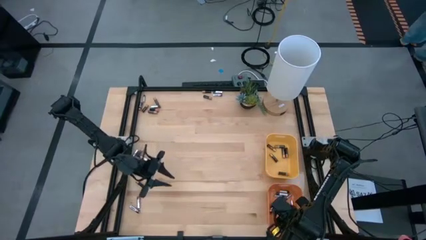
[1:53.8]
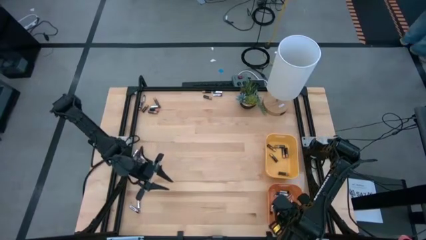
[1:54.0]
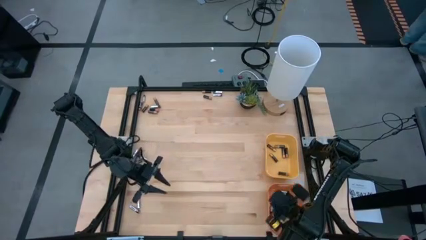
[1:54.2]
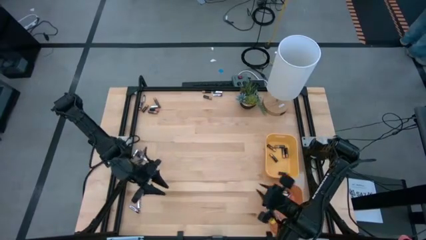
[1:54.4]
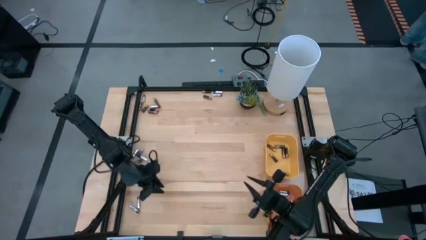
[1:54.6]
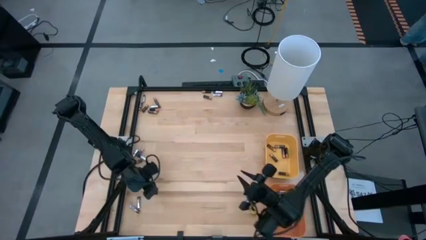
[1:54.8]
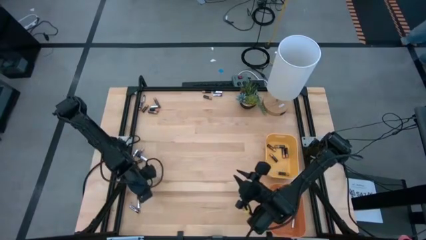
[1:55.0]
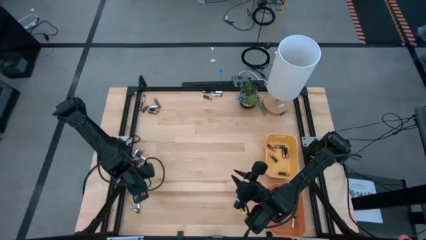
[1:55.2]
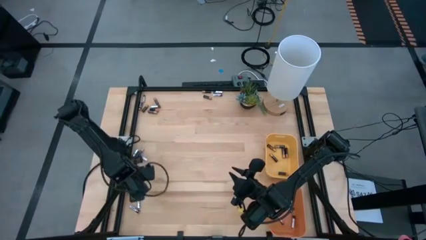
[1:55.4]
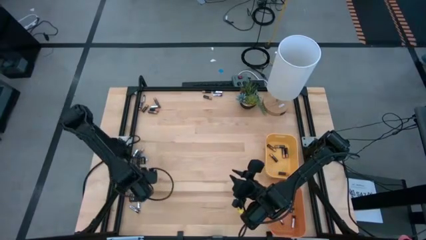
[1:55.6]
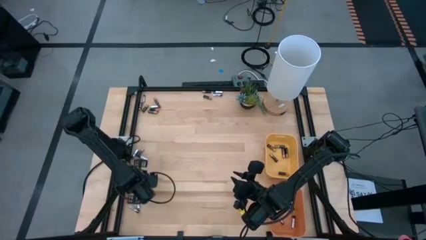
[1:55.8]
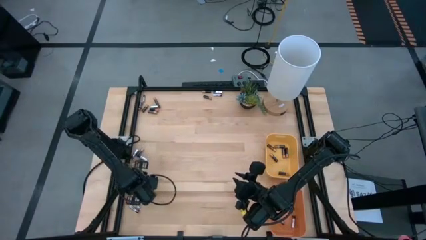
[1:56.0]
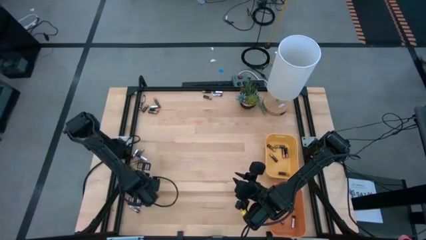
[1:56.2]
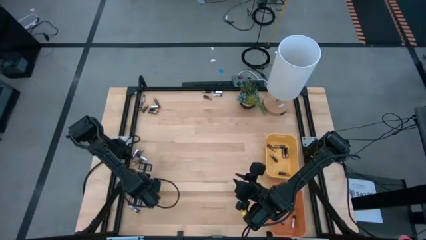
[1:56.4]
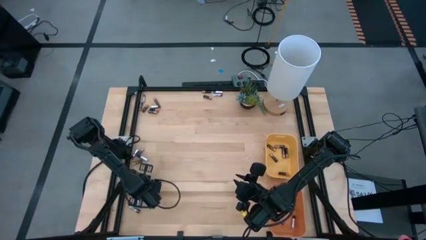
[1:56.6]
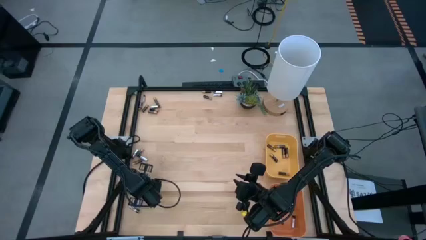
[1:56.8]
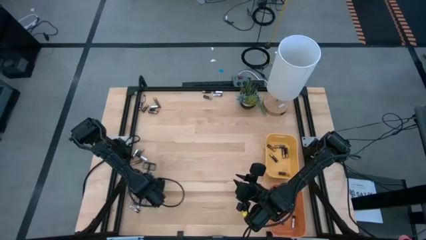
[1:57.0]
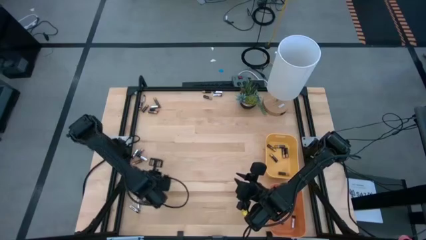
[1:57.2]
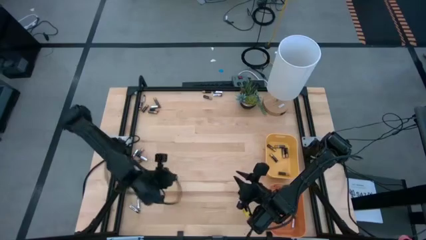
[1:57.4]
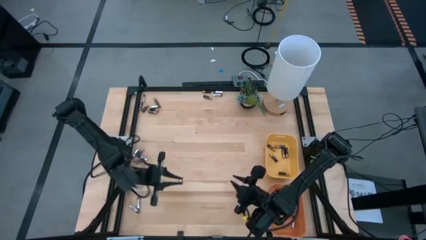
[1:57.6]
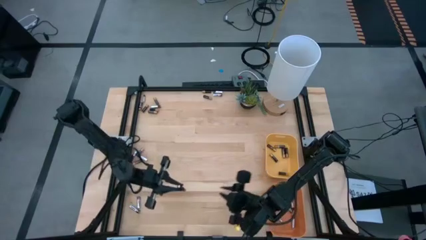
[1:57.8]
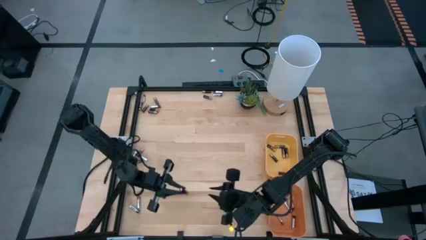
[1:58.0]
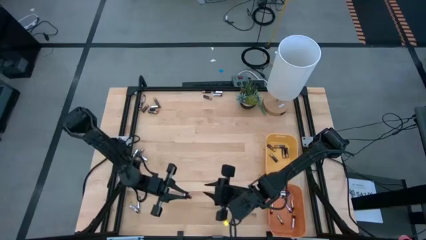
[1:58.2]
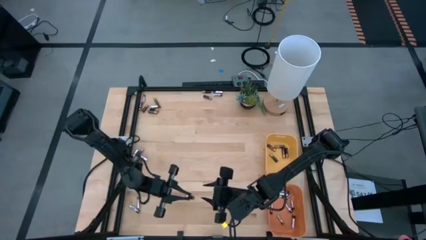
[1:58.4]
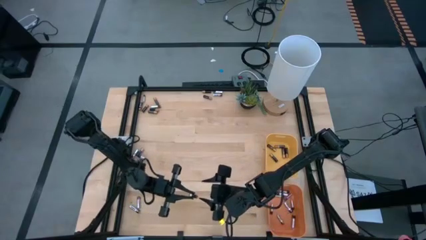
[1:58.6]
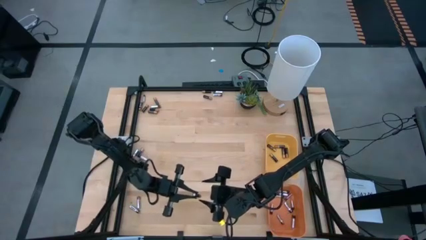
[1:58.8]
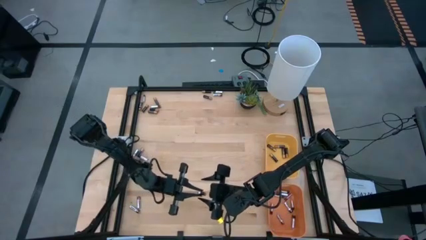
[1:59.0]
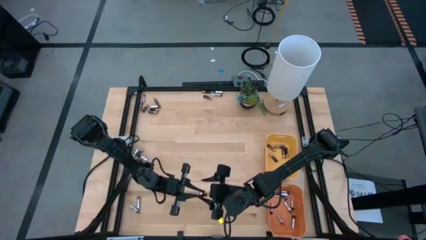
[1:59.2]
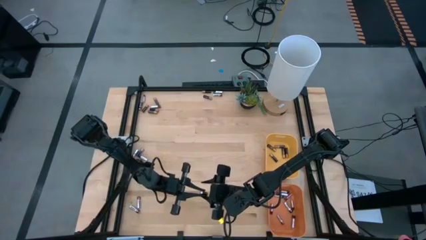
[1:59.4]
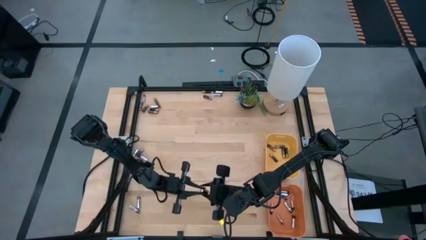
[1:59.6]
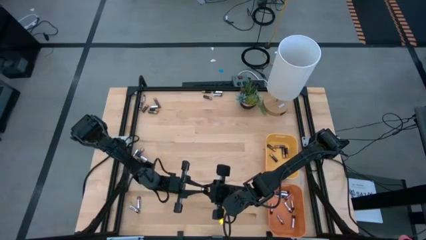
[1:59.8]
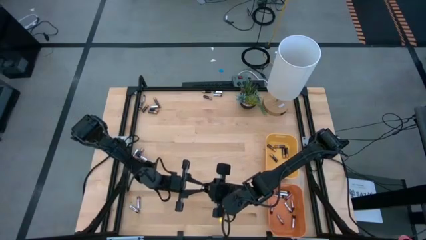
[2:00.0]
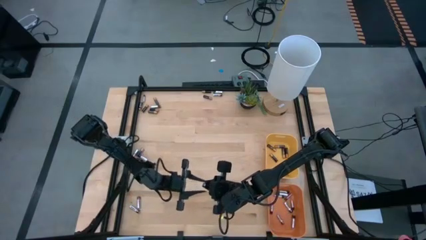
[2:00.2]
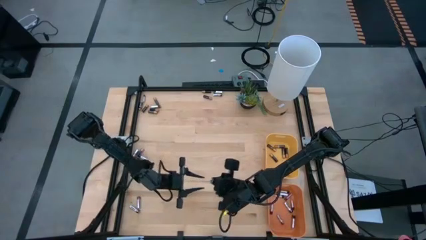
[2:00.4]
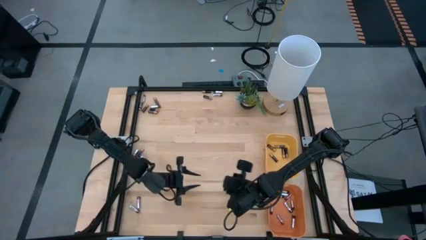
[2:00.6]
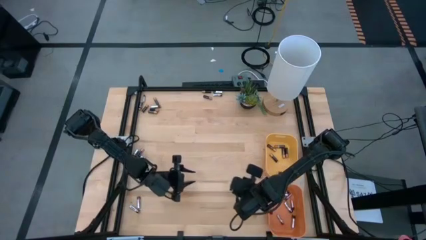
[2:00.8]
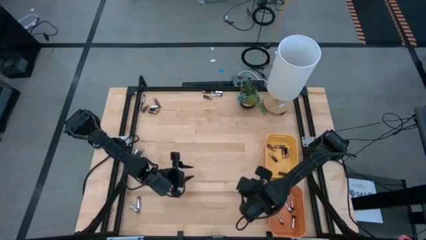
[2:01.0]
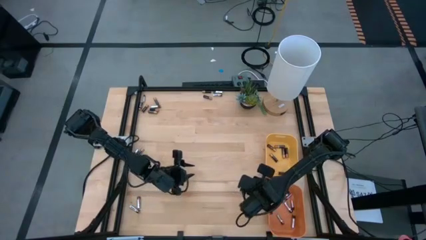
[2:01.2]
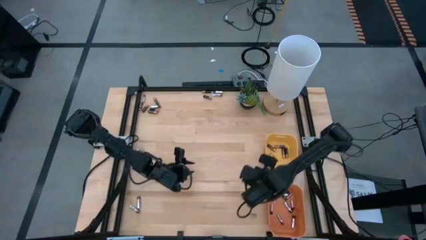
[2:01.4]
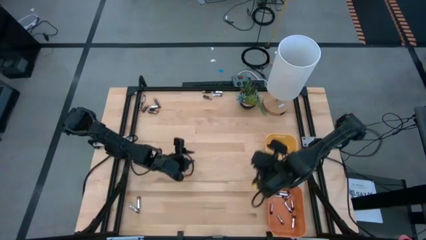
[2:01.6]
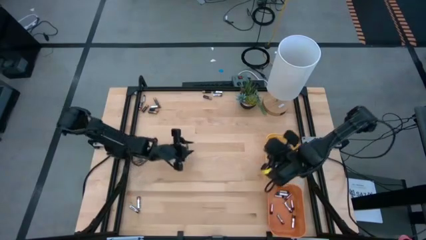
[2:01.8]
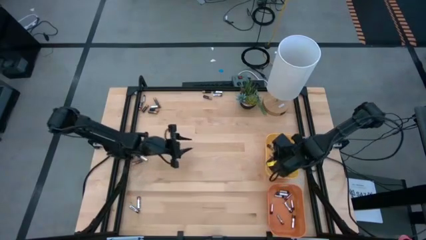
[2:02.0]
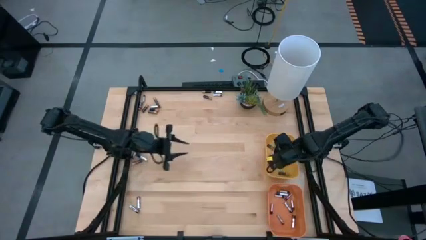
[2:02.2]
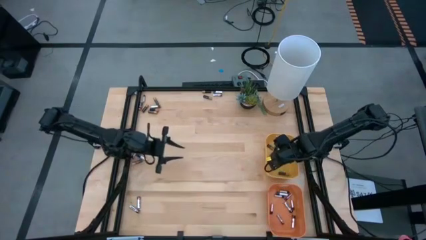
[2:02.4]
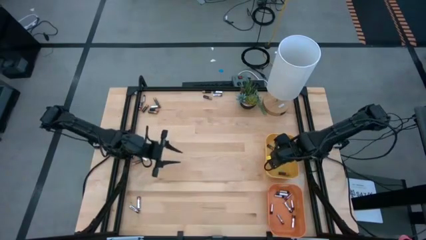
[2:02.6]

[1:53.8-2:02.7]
Task: Sort batteries
Put the brown battery into the yellow bin

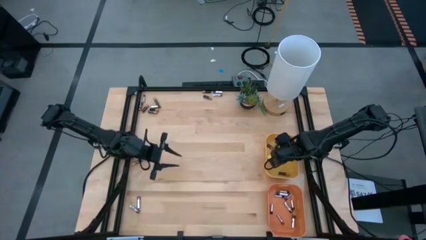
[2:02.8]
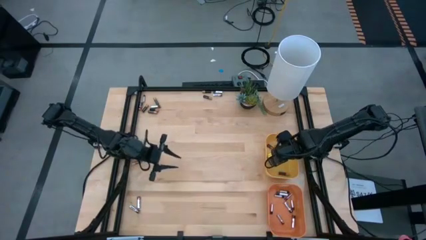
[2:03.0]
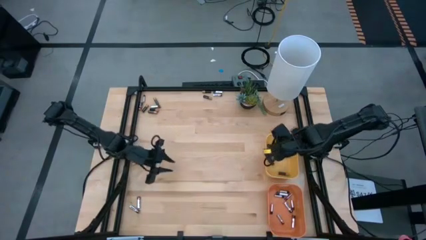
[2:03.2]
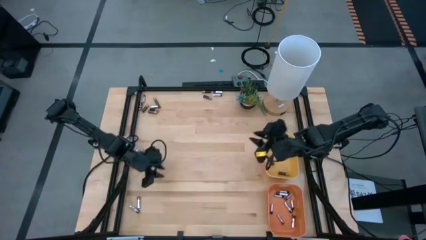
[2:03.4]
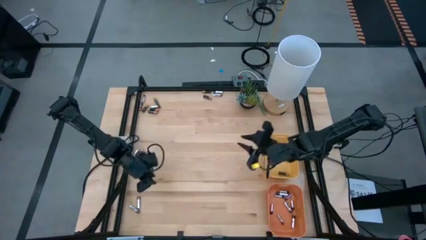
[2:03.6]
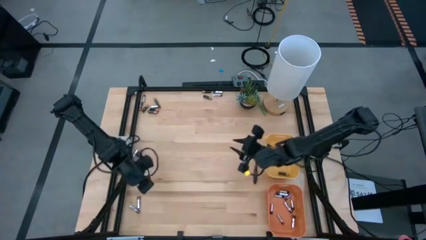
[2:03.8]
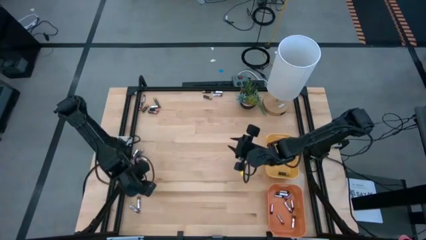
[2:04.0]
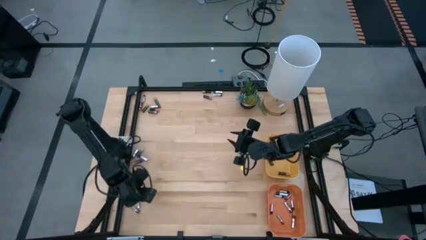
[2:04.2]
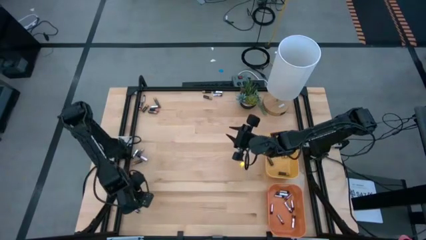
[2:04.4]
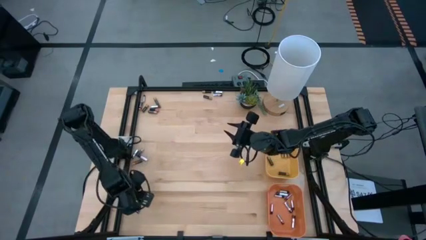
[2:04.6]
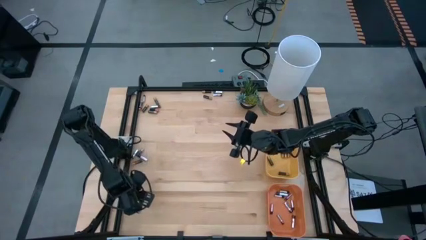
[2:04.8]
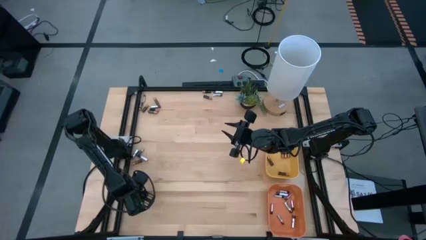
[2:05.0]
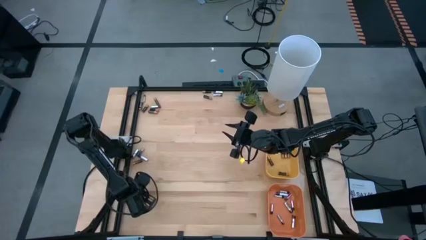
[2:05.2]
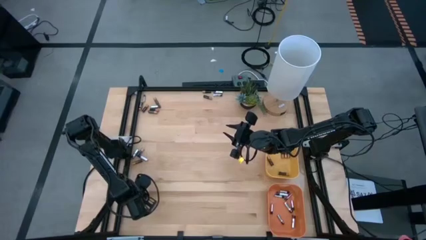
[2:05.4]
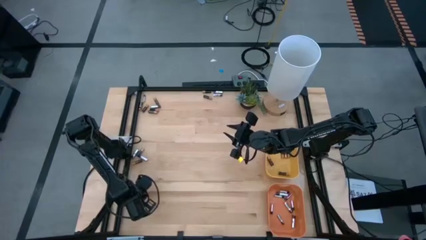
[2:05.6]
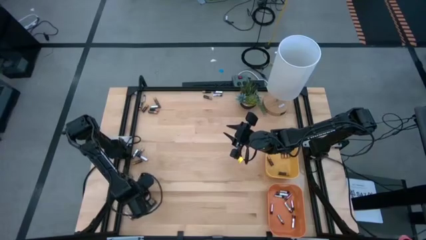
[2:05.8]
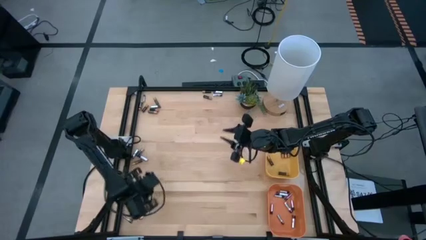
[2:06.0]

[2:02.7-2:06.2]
Put the black battery into the orange bin

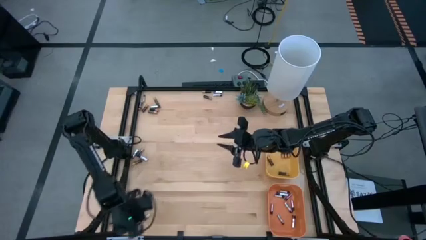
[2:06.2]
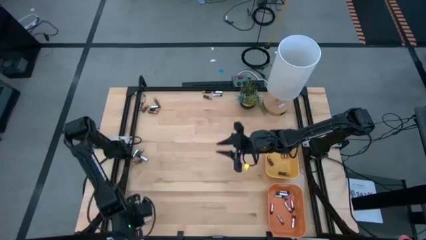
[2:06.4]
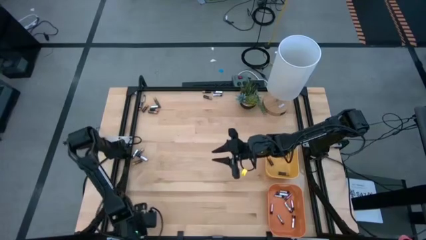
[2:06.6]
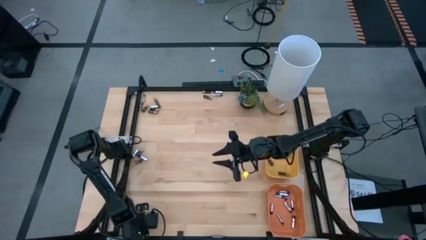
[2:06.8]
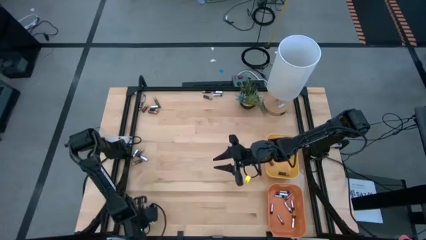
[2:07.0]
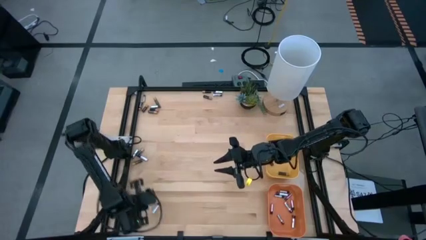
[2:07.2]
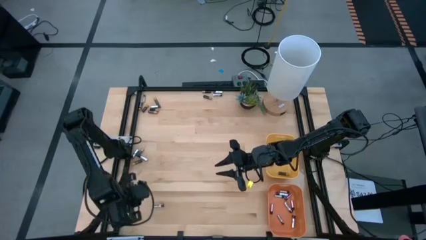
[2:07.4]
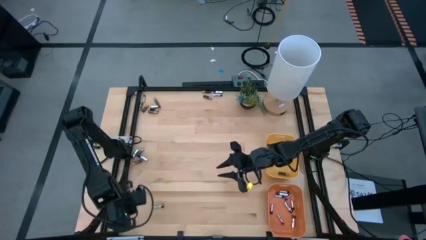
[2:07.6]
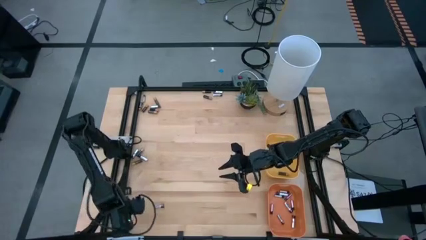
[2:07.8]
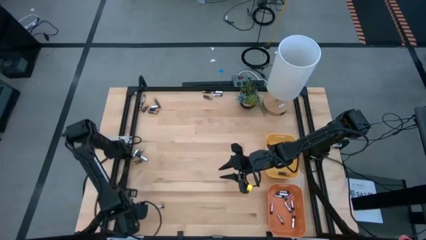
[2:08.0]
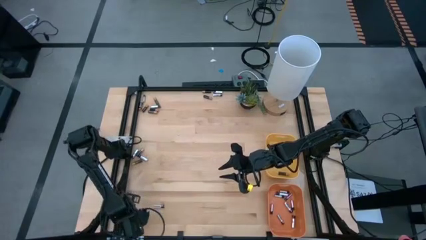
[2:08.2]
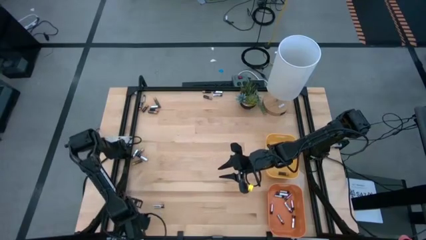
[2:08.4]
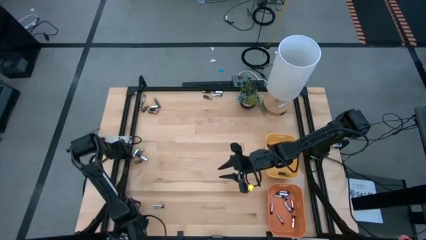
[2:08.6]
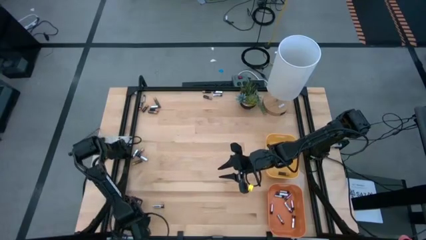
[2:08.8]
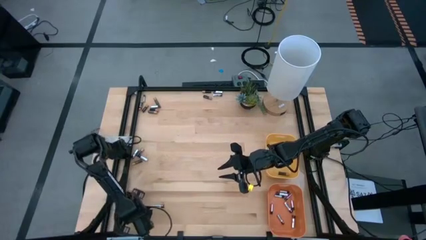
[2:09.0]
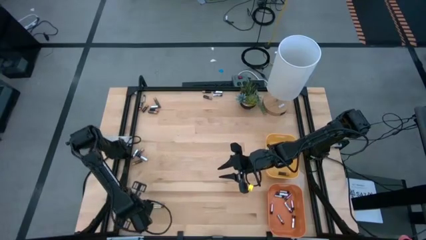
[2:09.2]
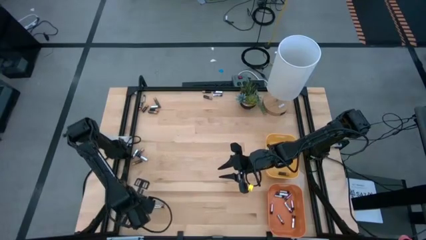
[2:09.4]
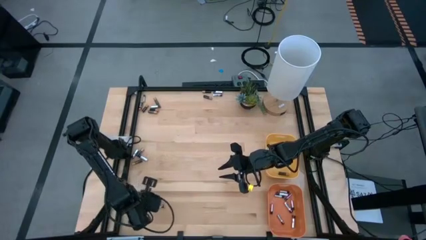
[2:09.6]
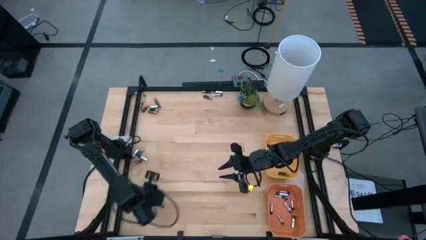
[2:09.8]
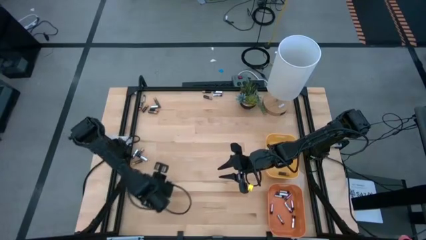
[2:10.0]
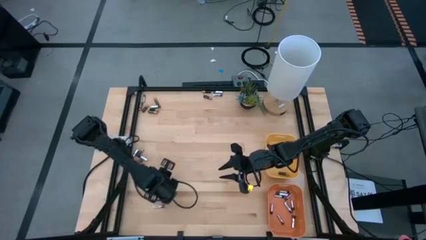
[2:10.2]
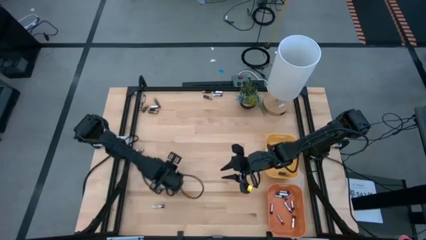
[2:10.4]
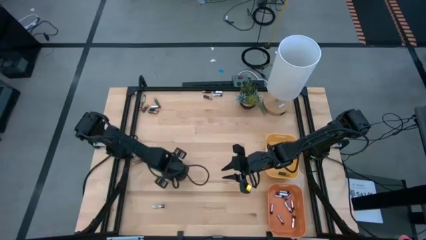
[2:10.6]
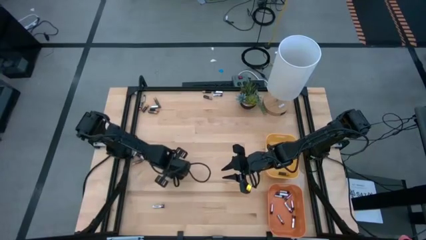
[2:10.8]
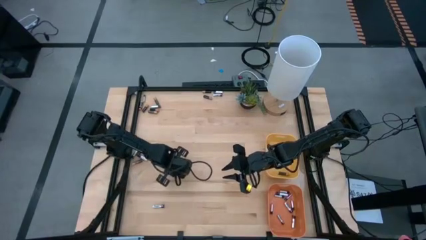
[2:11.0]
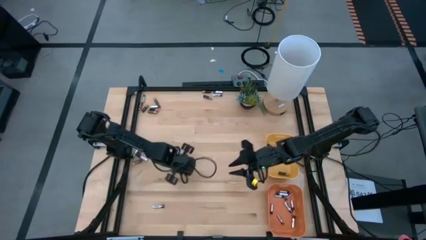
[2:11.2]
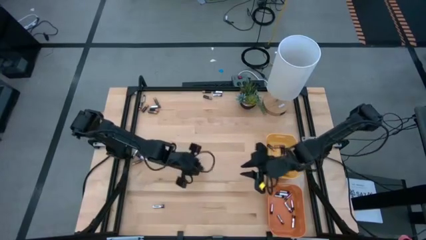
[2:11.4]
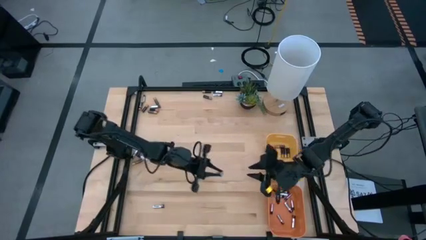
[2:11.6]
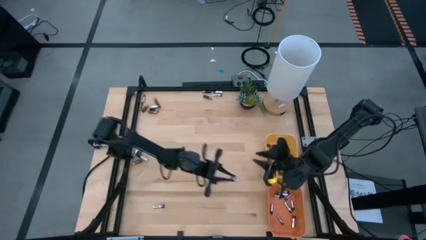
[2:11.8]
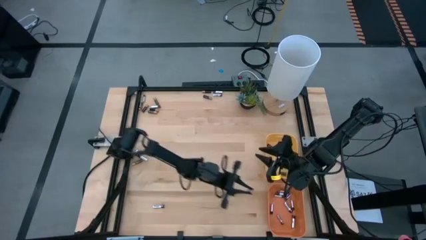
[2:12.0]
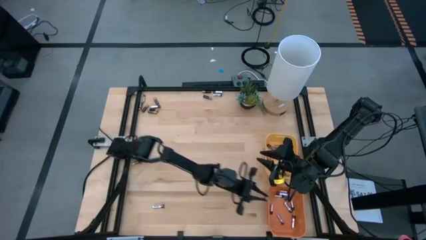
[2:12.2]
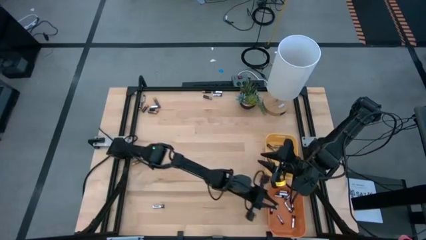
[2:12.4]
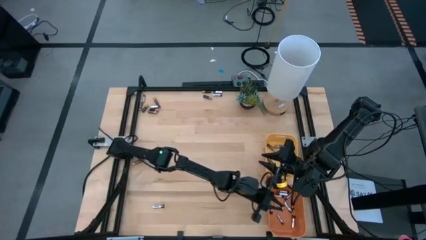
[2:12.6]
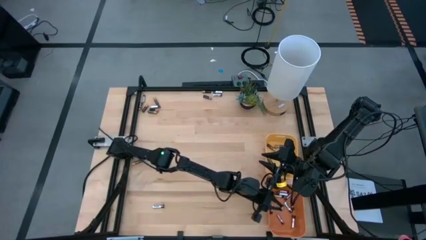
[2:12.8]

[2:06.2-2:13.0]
Put the black battery into the orange bin
